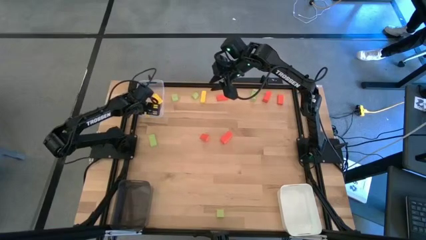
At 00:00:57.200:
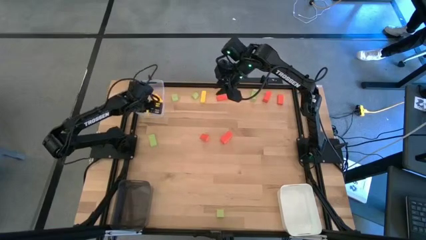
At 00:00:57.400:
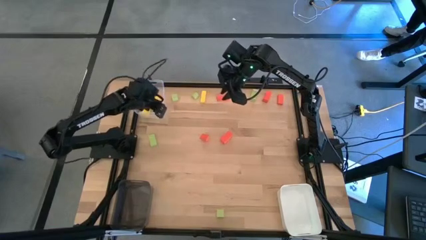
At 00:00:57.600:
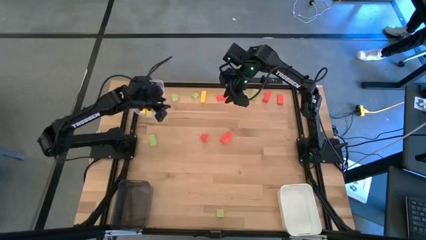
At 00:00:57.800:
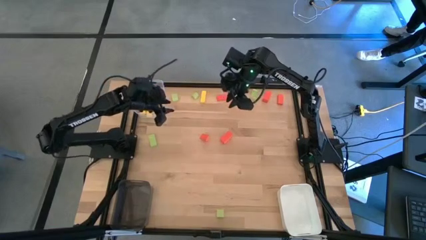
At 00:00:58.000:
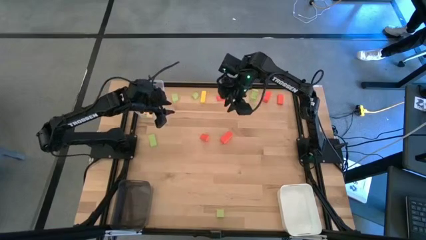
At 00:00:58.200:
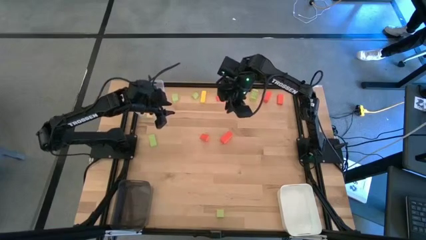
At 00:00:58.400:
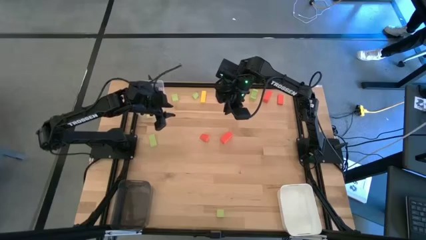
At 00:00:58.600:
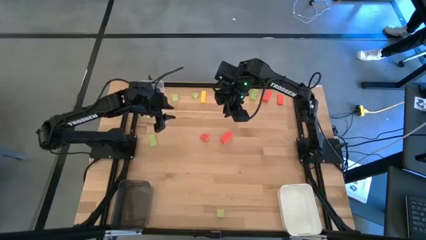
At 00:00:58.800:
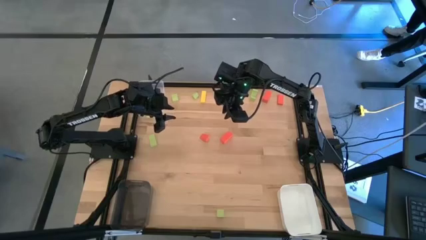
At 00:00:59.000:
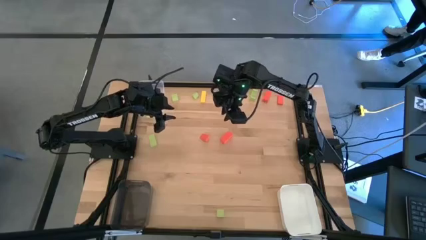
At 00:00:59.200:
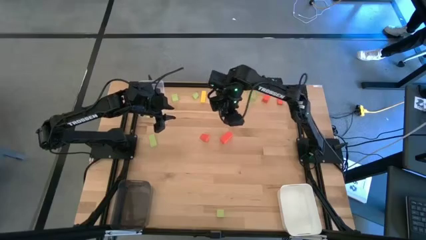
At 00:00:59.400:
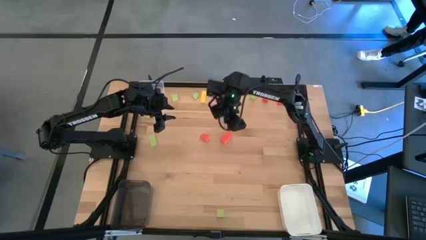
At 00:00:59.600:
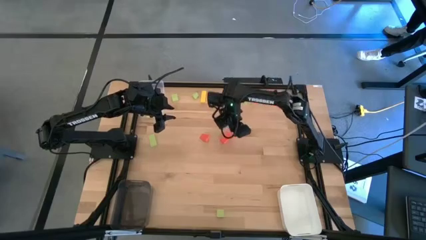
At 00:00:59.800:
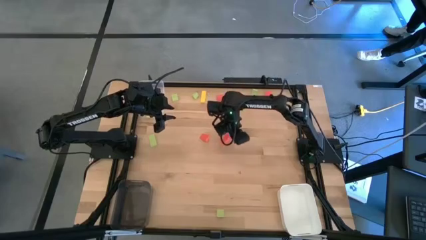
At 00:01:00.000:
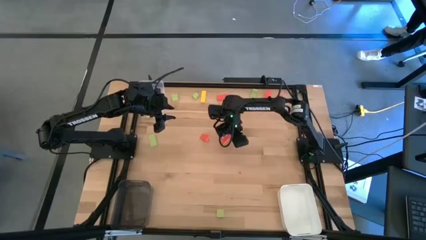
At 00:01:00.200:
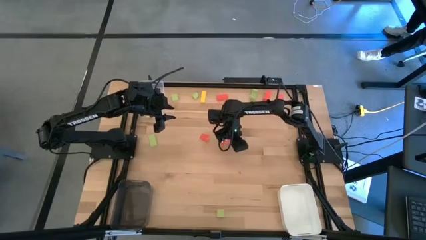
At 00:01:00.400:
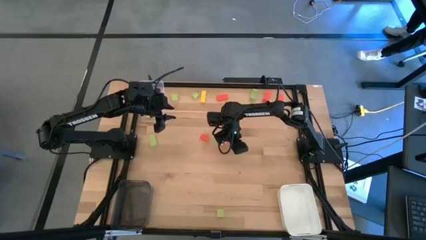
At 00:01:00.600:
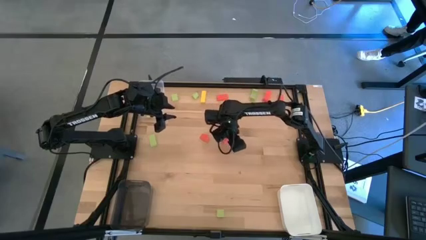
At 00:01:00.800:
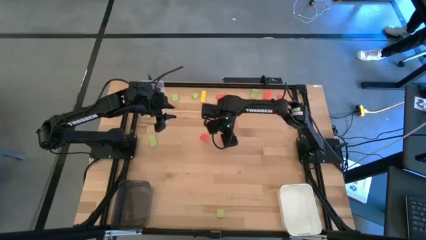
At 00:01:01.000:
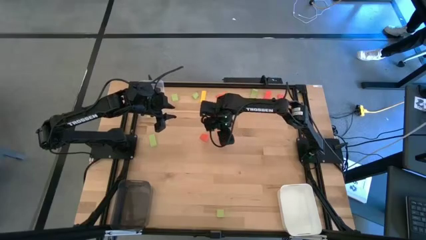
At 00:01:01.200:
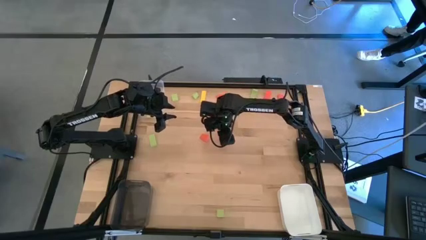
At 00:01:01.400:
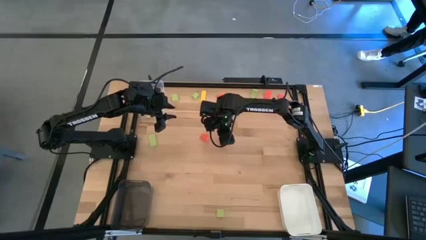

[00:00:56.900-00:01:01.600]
Task: Sort & place blocks by color
Put the orange block into the white bin

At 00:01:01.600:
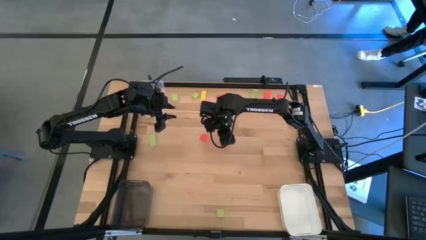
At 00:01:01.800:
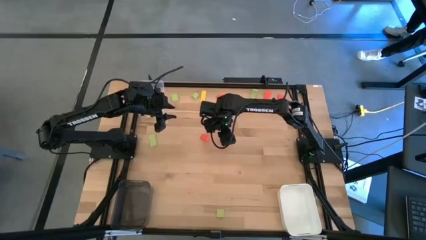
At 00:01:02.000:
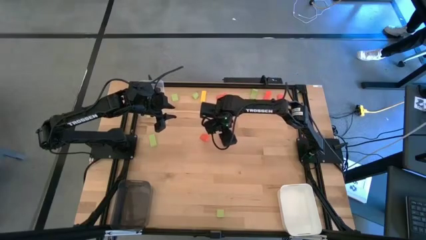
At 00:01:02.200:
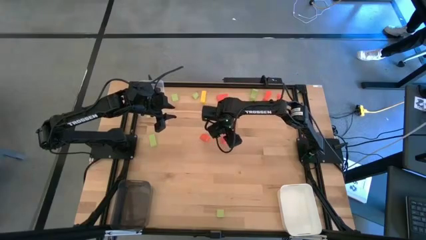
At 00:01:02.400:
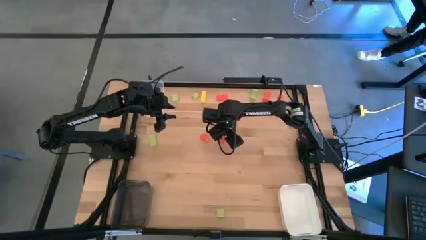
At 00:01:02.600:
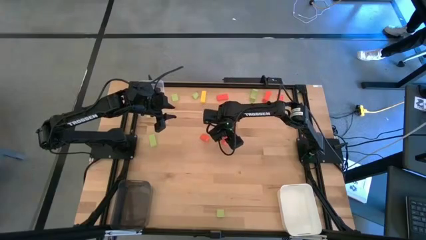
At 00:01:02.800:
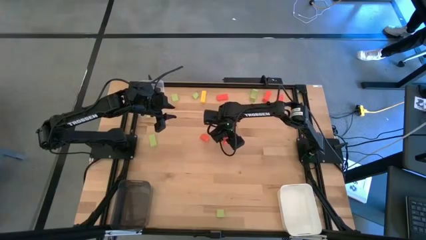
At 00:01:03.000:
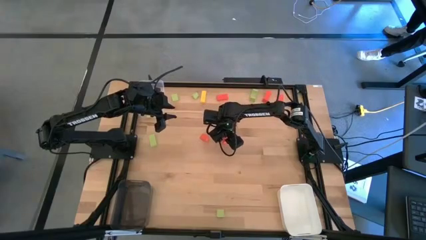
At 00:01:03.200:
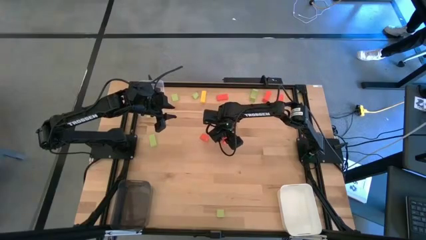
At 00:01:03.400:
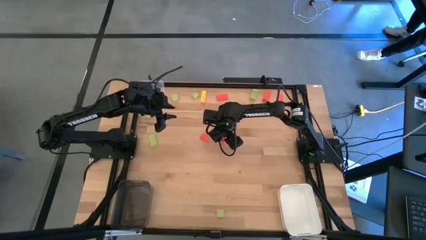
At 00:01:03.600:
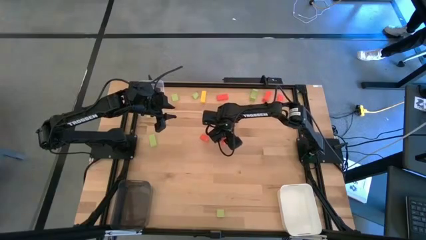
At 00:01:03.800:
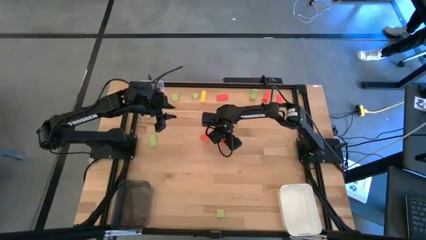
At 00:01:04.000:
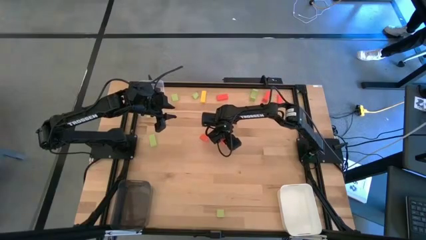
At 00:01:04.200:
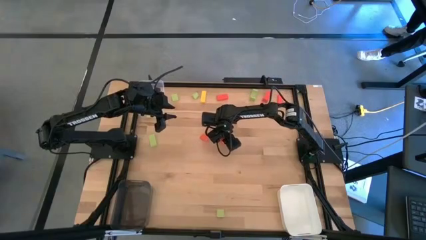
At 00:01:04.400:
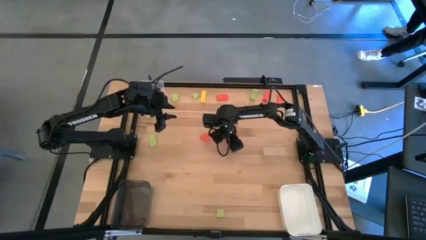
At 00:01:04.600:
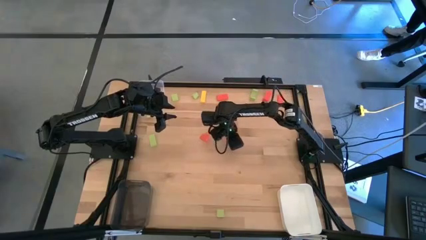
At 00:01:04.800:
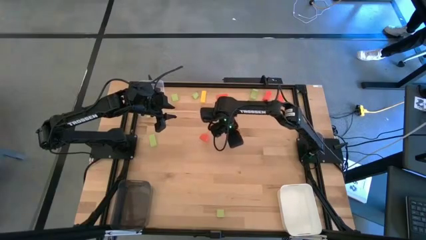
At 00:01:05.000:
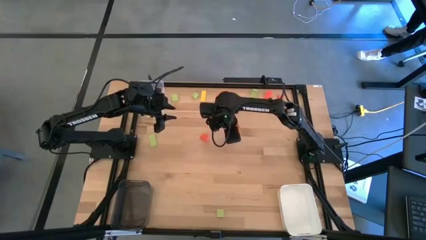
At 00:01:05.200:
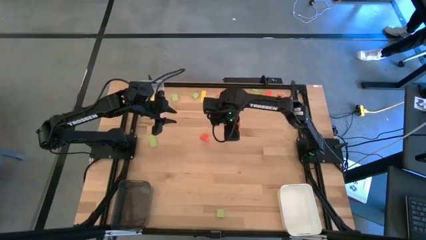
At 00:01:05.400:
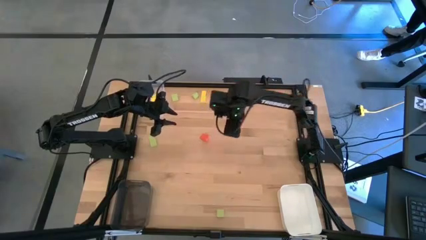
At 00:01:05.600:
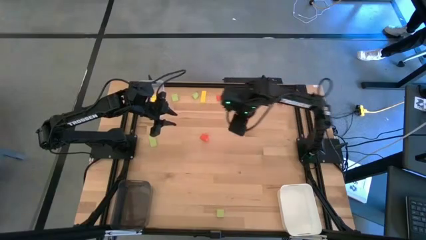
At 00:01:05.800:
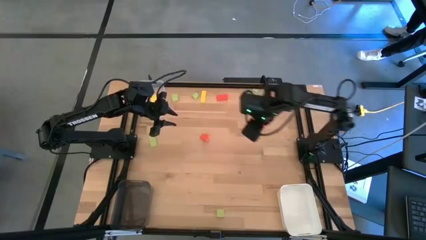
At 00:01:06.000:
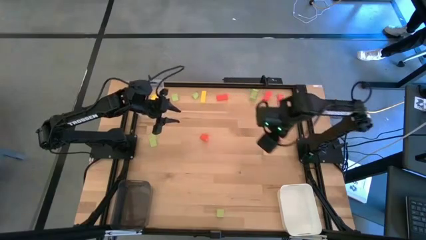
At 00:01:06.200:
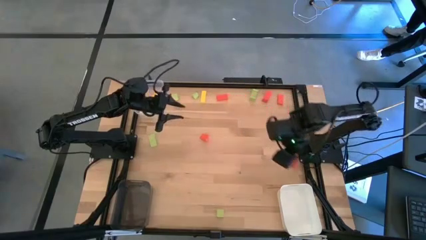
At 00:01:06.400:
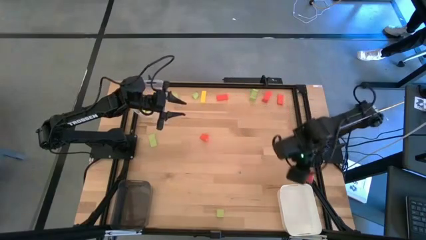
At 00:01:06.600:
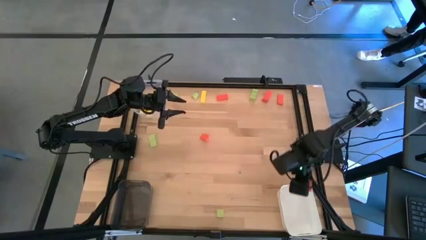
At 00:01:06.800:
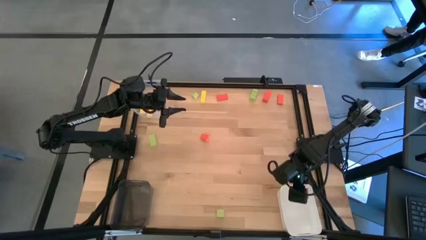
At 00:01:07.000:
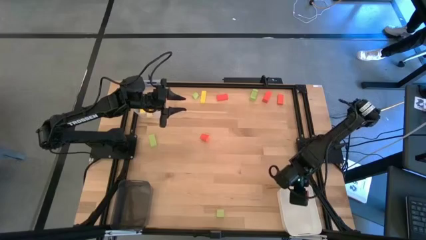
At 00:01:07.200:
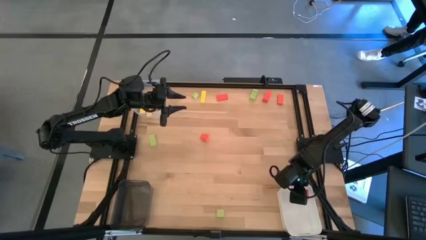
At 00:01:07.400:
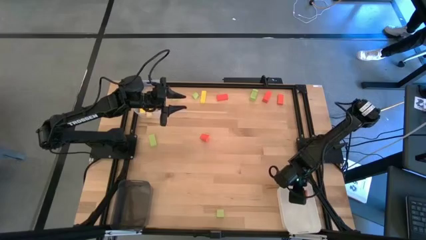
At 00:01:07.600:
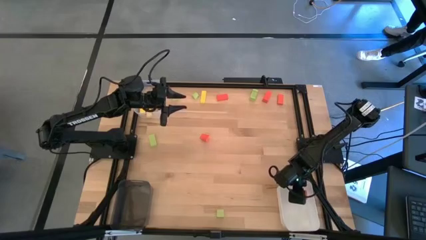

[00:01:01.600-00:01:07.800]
Put the orange block into the white bin
